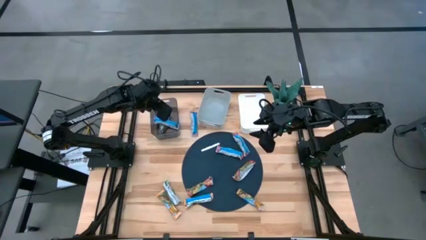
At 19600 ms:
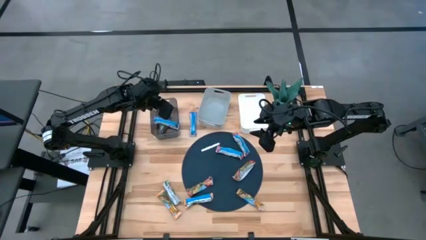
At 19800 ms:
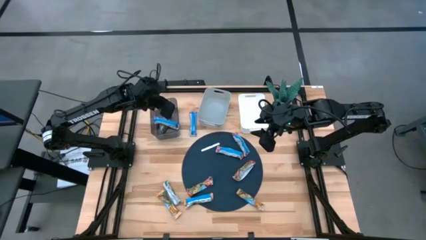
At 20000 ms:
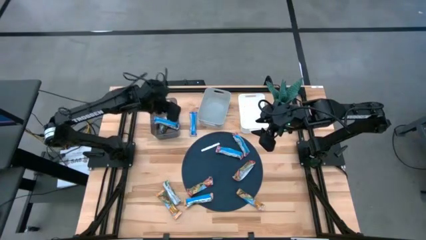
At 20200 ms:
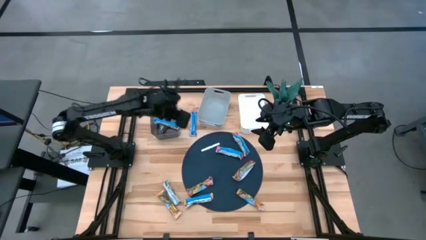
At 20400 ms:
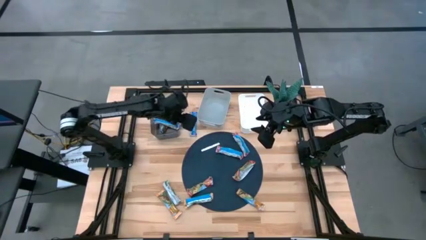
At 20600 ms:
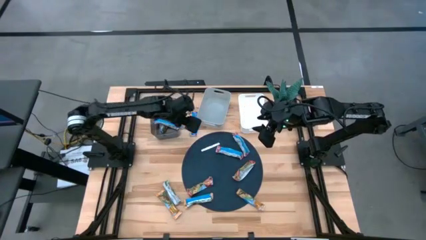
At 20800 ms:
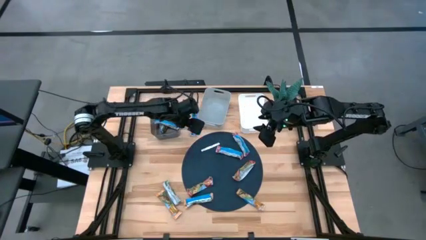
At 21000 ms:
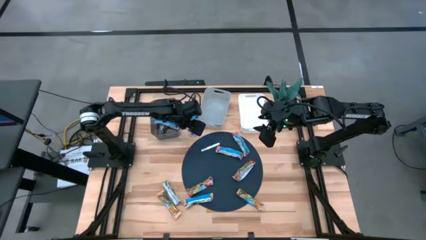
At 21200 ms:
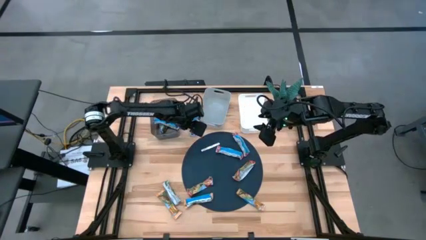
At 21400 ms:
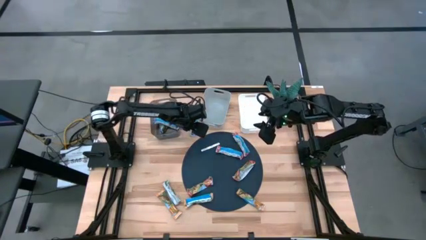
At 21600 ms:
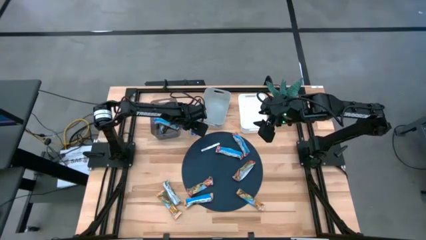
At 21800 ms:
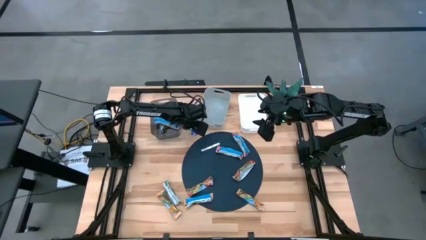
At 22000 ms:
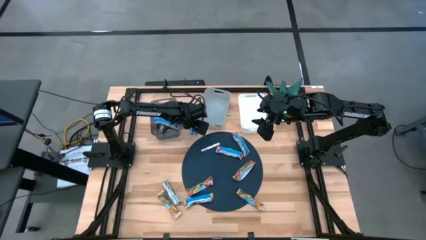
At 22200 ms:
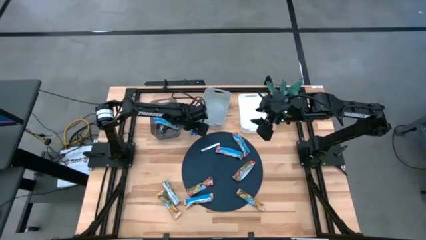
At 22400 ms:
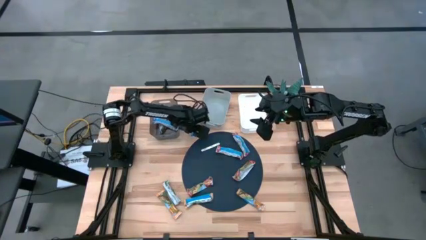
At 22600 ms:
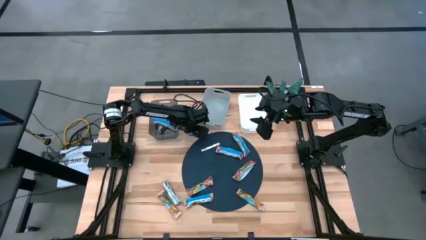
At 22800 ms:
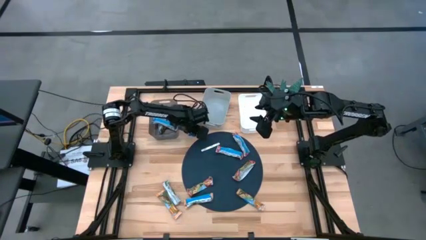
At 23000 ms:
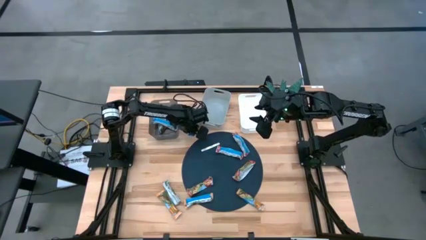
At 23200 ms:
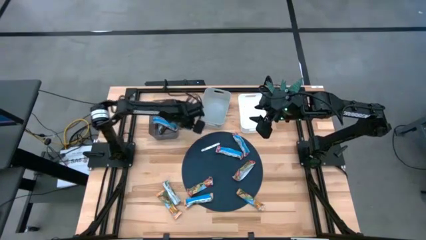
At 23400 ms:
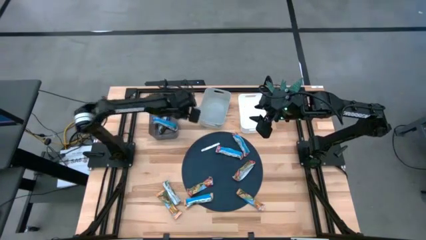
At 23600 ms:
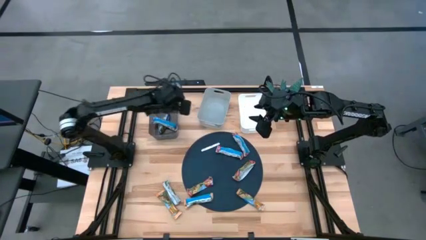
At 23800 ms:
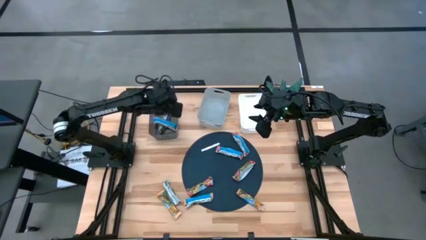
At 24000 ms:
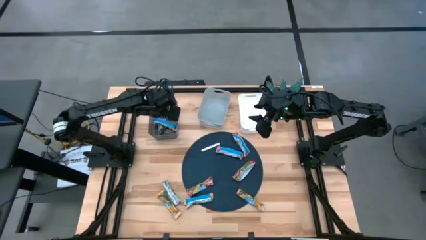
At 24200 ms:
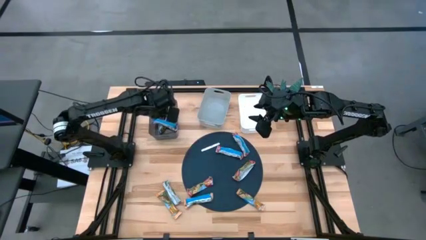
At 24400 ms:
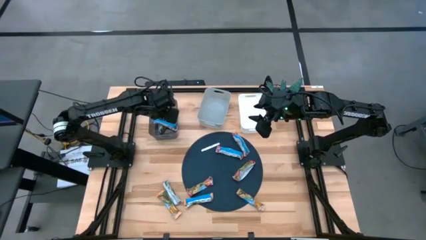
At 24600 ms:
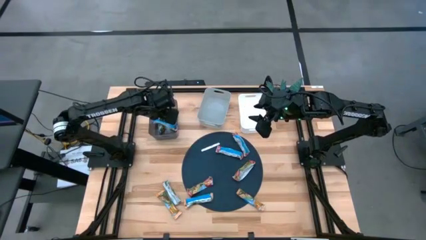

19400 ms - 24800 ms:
Task: Pick and place Granola Bars by type
Put the blue granola bar into the black bin

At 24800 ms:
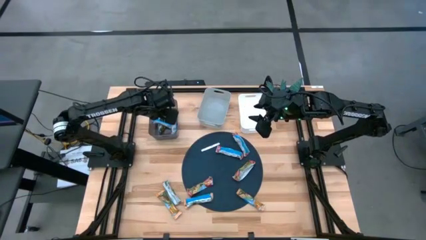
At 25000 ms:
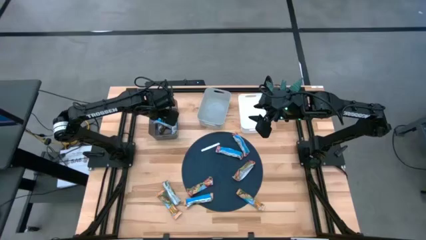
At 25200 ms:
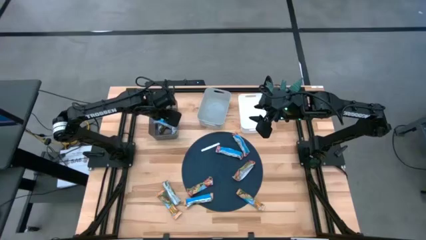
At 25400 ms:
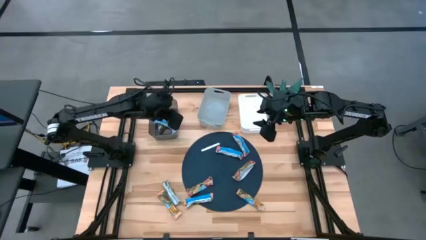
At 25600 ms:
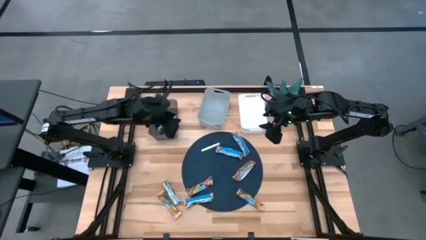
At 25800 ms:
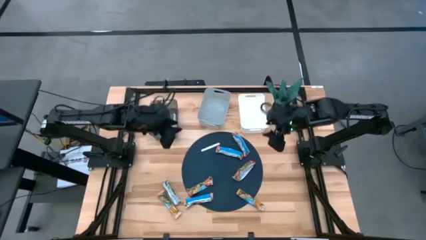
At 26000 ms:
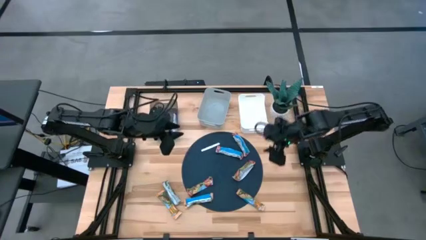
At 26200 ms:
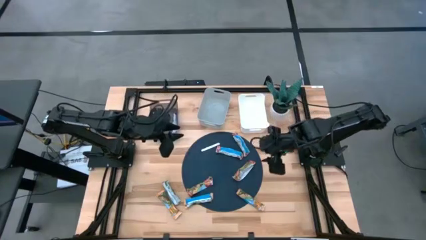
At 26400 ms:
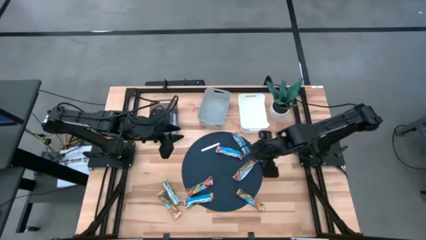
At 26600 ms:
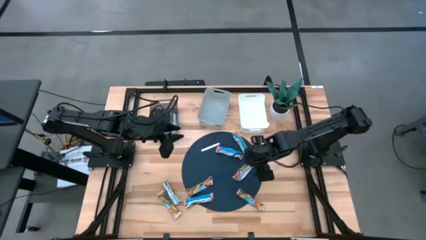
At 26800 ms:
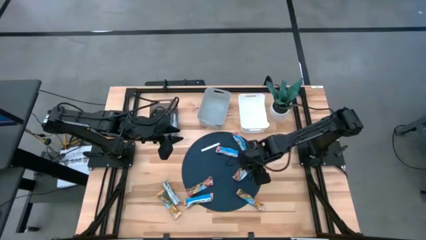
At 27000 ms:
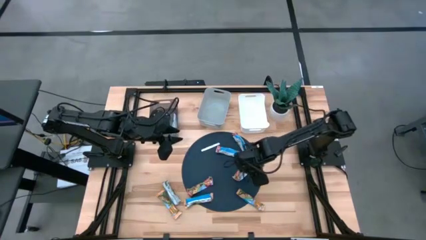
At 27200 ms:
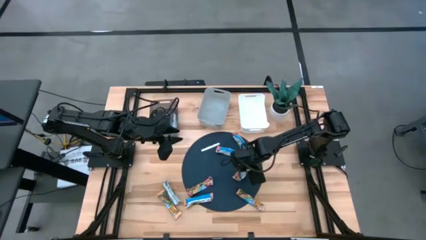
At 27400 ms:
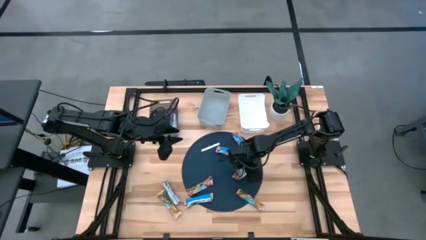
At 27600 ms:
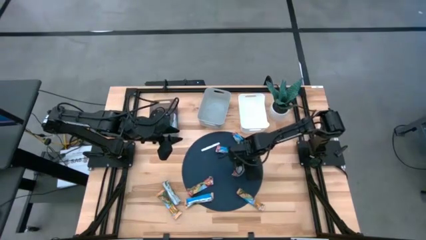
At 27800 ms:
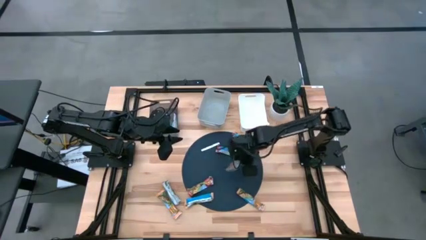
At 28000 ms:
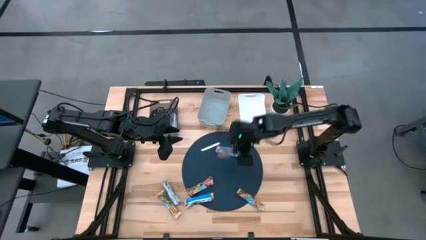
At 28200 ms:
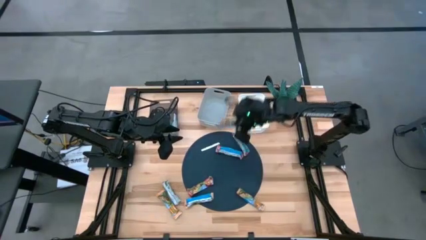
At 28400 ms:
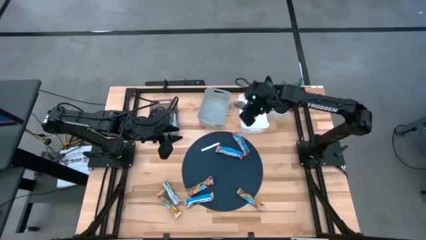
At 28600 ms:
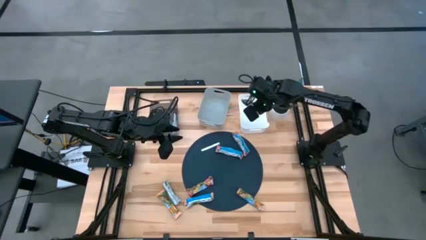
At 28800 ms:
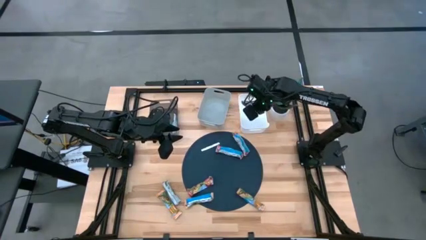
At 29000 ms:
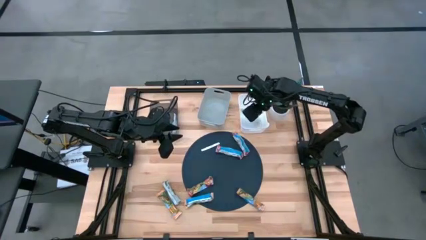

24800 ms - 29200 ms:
Put the red granola bar into the white bin

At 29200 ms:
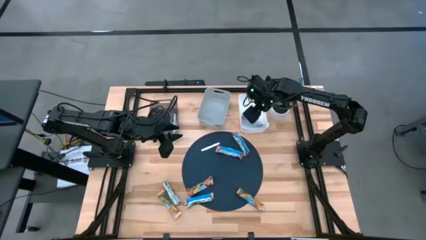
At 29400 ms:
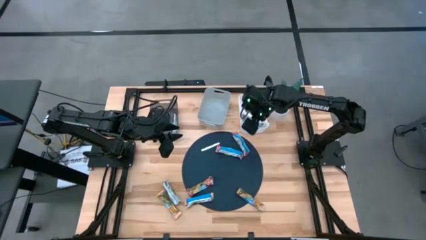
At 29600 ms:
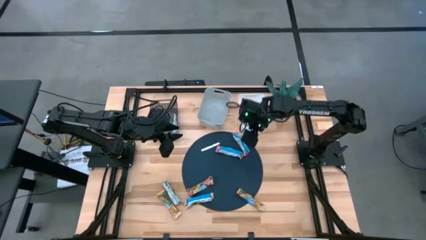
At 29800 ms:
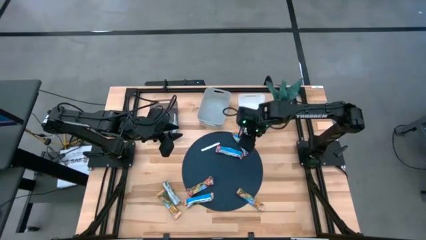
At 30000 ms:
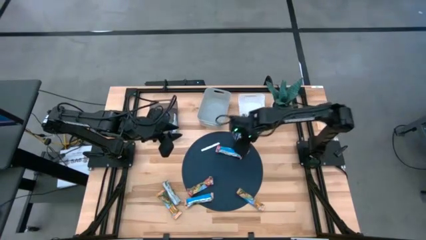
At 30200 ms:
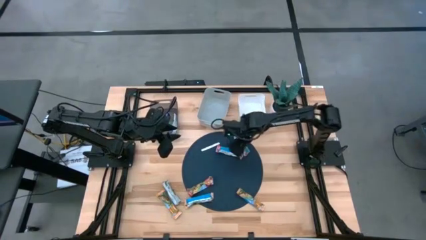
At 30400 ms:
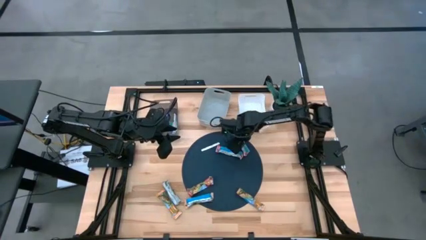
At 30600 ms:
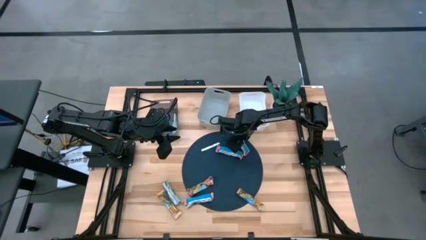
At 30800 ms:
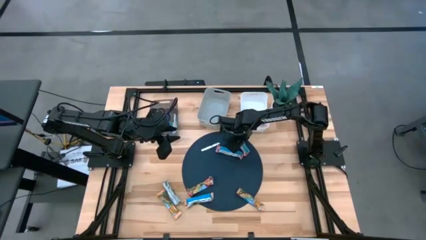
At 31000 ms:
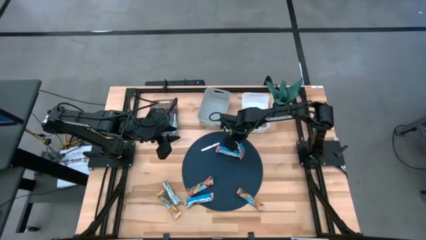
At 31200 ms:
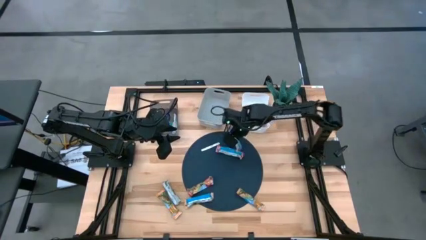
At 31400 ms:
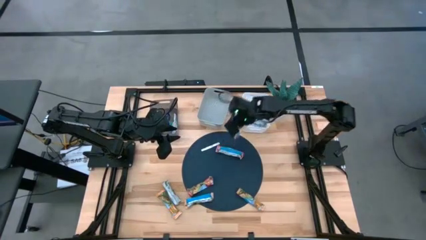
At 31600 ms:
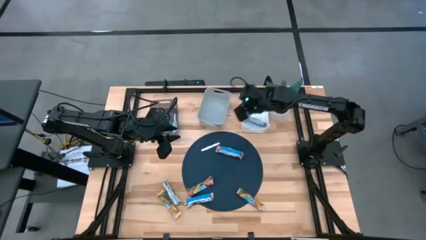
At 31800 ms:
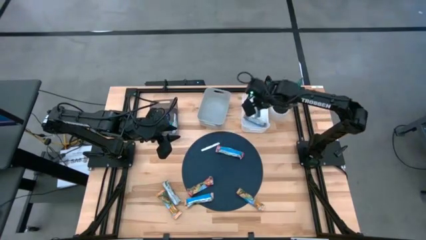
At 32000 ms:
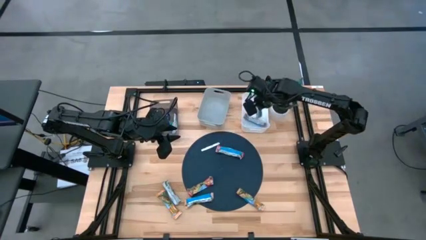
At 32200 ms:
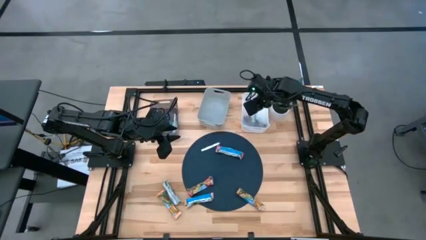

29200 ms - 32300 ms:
Put the red granola bar into the white bin

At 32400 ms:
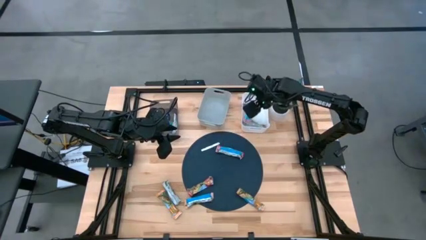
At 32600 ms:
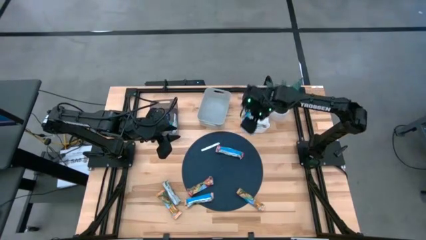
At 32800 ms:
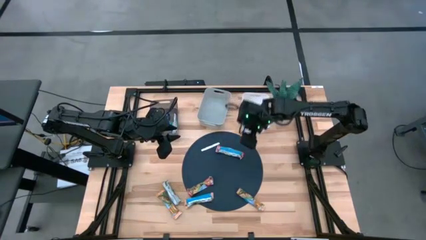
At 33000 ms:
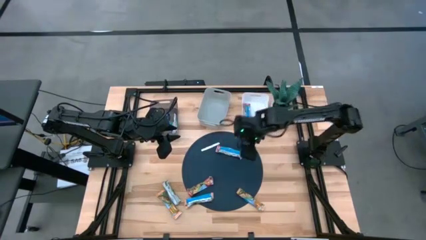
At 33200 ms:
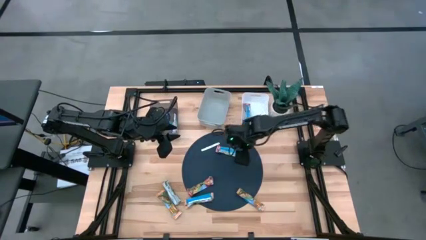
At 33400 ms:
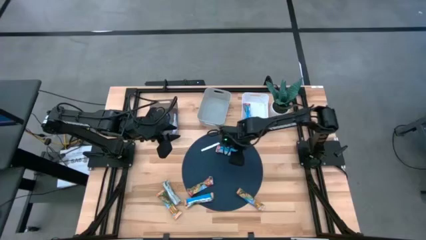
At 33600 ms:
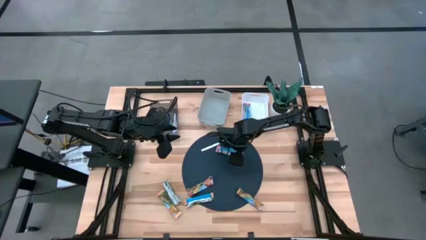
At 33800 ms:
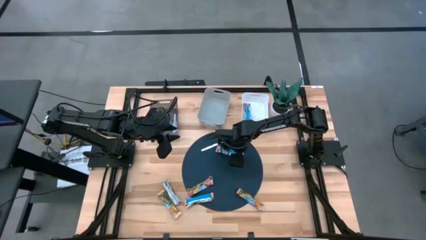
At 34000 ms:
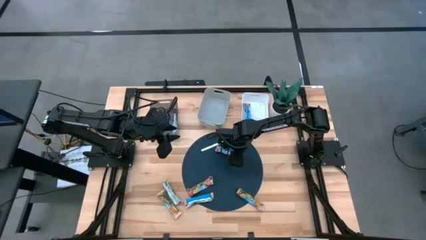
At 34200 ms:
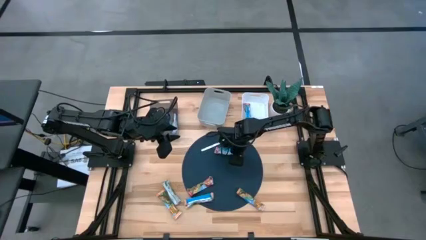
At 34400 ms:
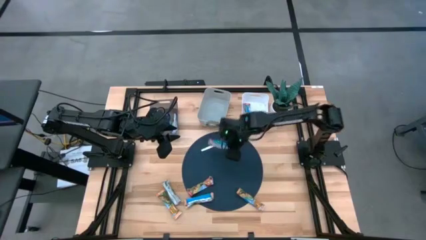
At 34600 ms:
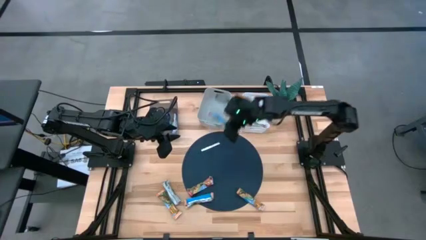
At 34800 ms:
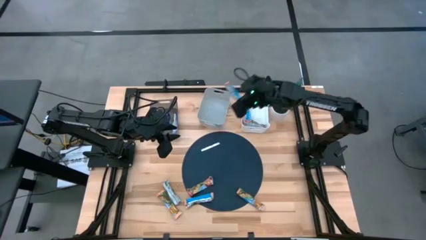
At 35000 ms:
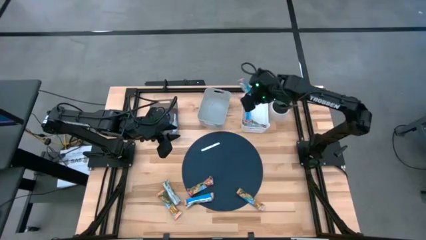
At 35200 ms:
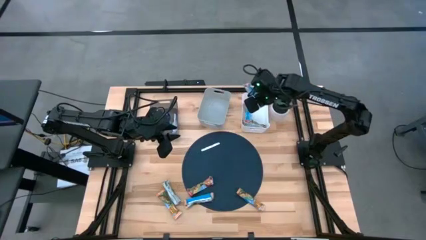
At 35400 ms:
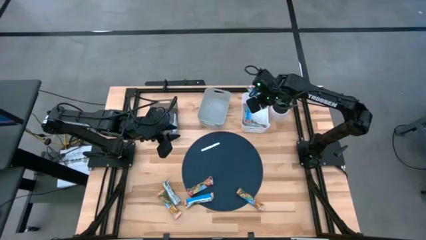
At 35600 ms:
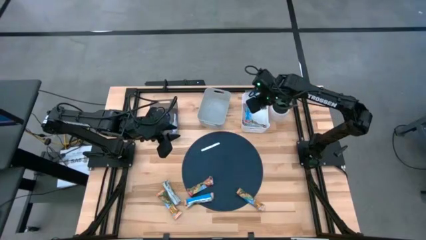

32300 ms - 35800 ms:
Put the red granola bar into the white bin
